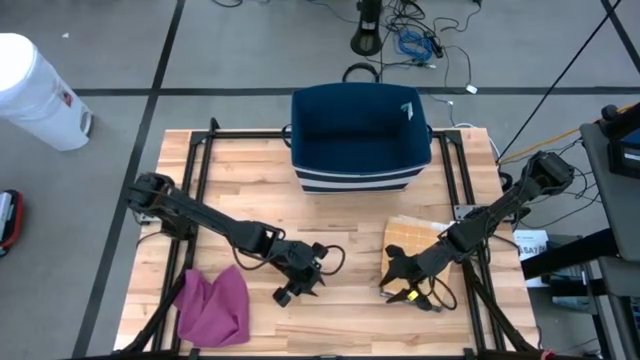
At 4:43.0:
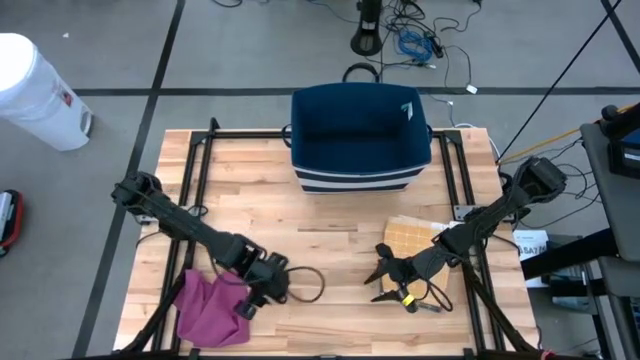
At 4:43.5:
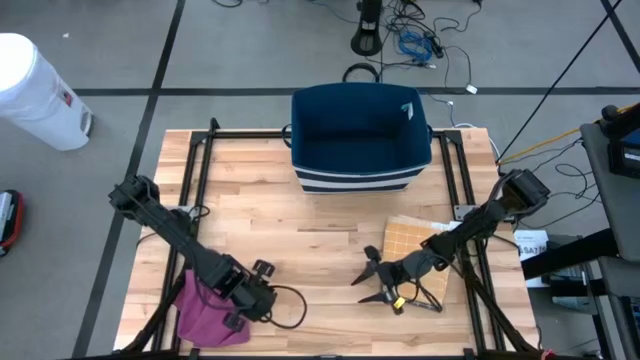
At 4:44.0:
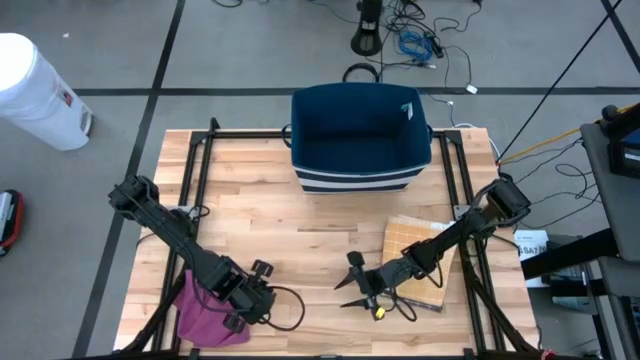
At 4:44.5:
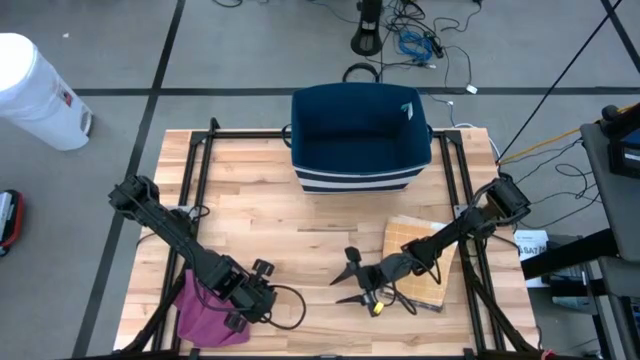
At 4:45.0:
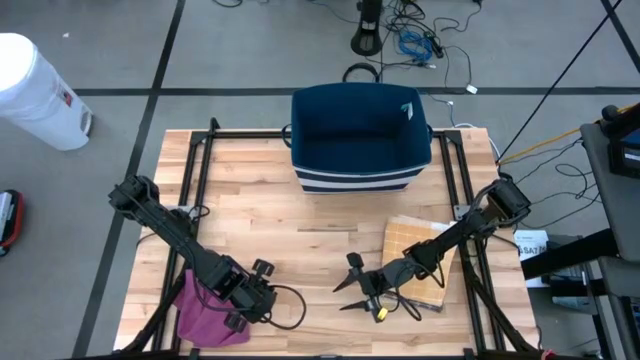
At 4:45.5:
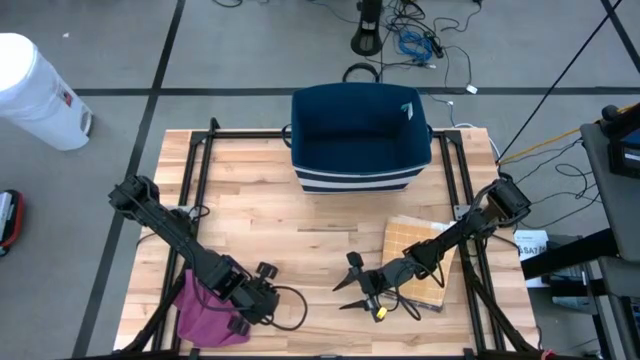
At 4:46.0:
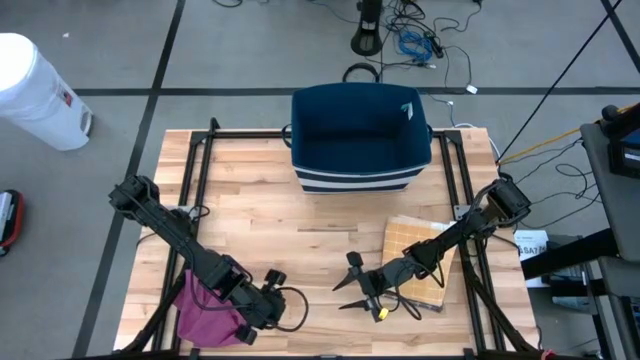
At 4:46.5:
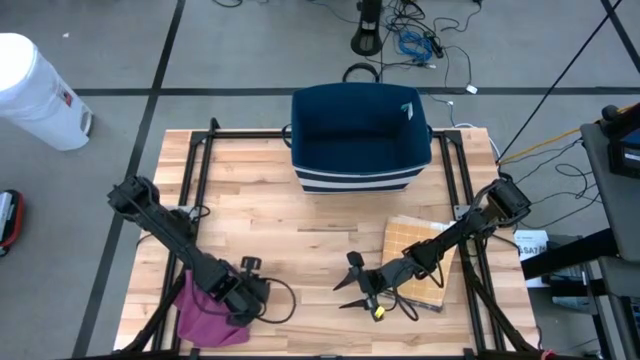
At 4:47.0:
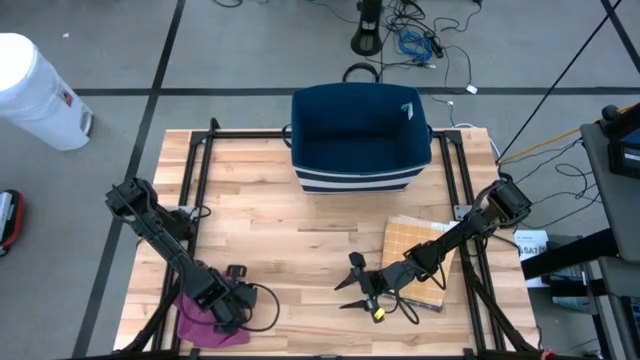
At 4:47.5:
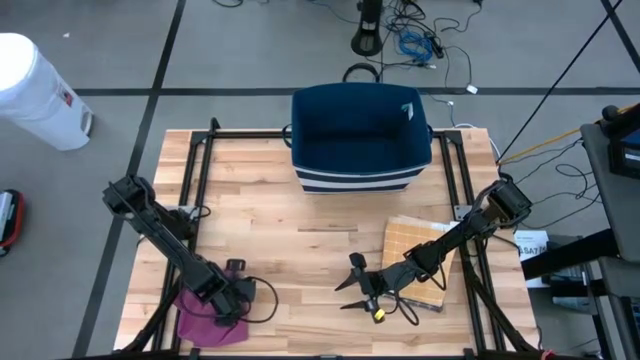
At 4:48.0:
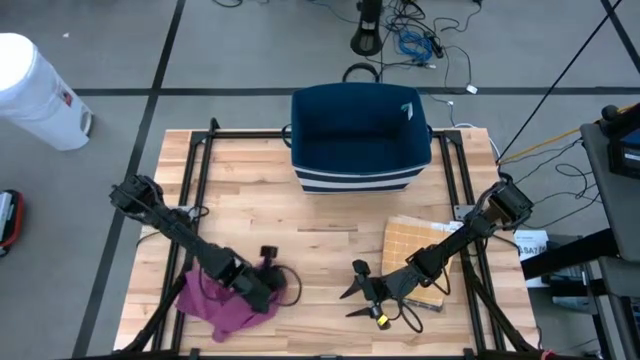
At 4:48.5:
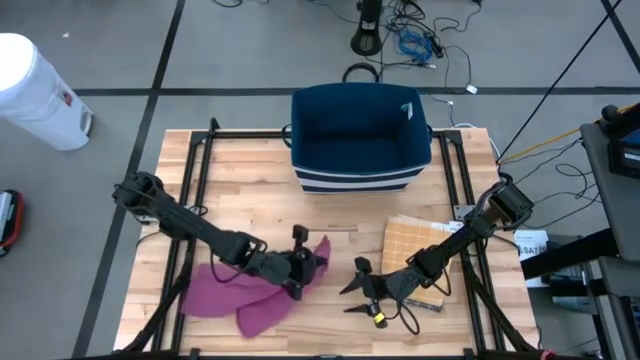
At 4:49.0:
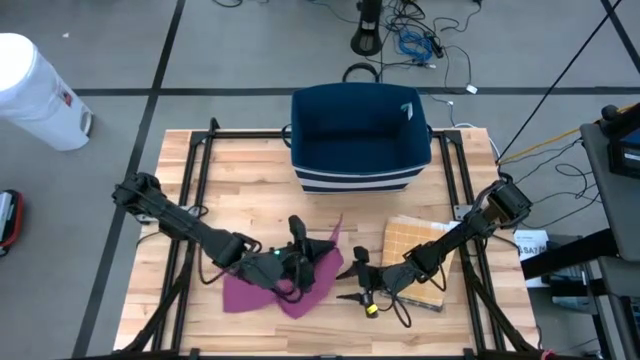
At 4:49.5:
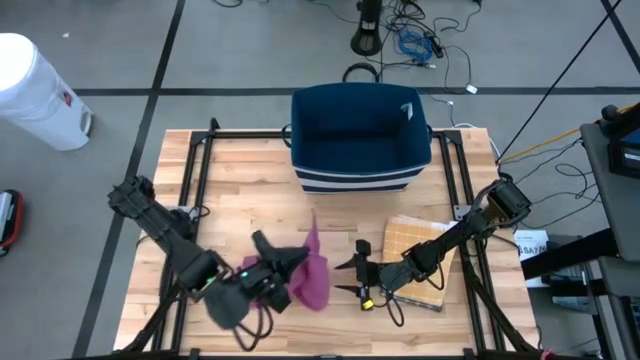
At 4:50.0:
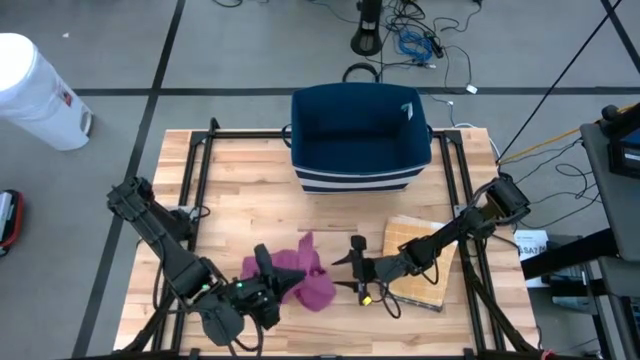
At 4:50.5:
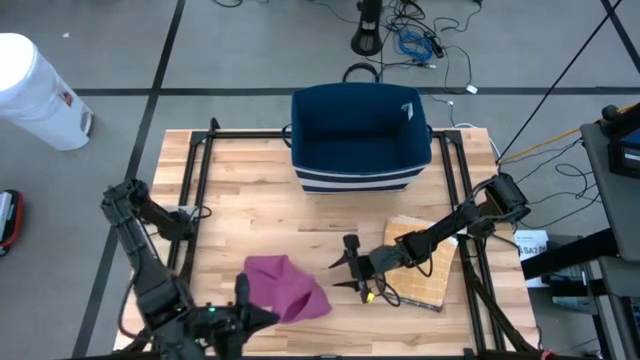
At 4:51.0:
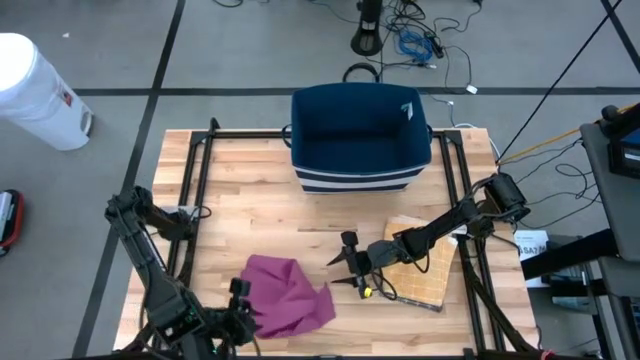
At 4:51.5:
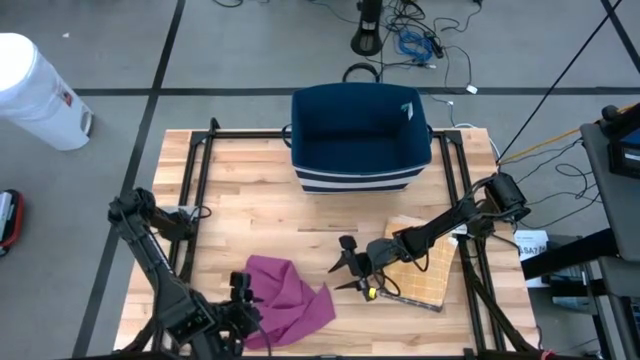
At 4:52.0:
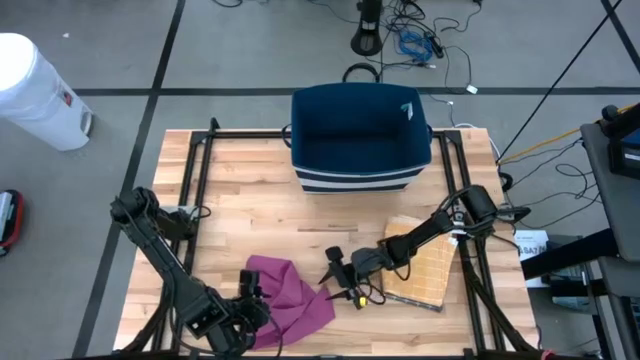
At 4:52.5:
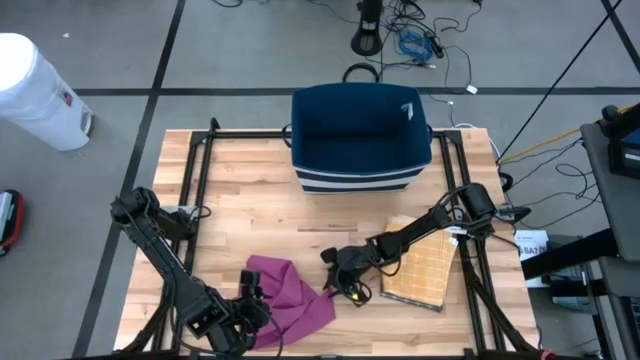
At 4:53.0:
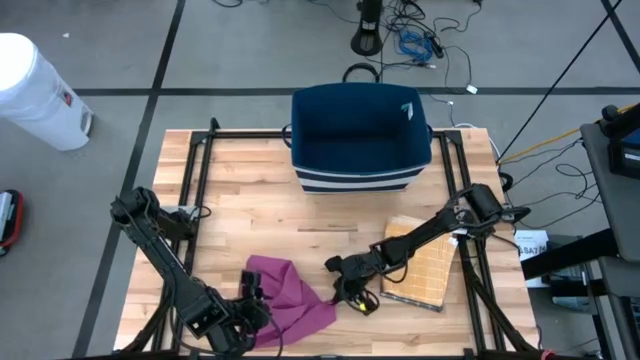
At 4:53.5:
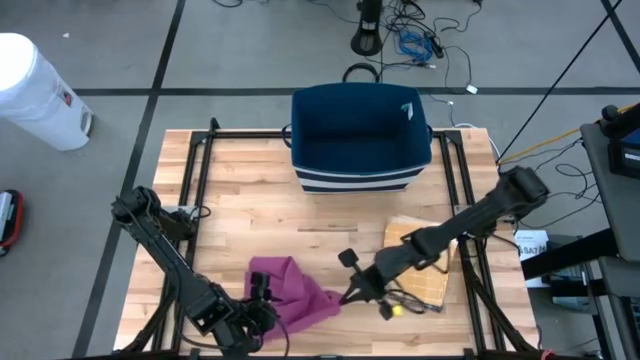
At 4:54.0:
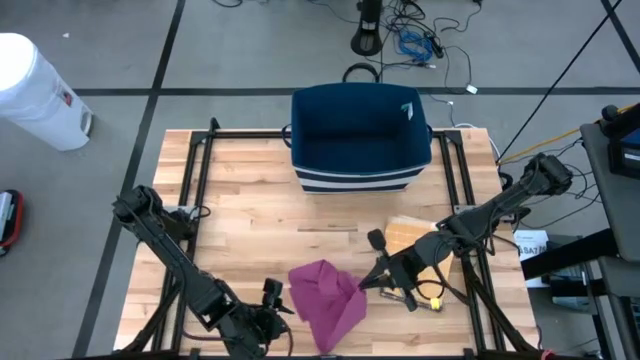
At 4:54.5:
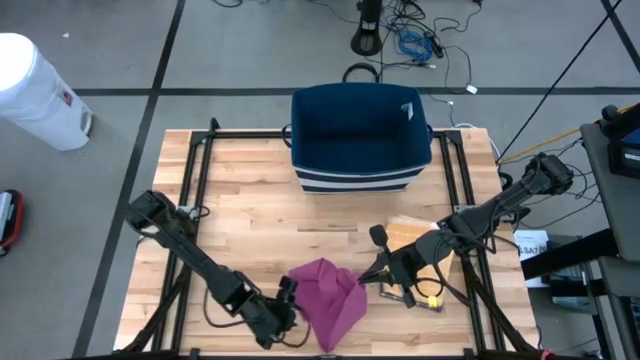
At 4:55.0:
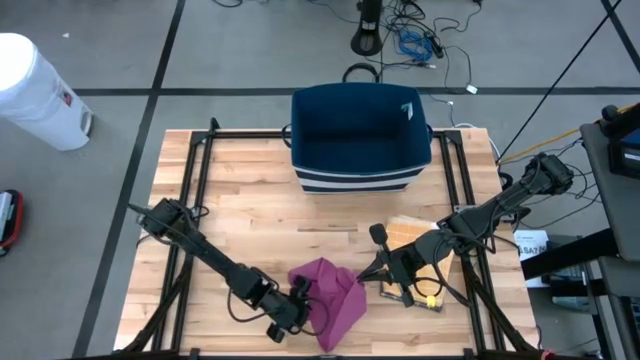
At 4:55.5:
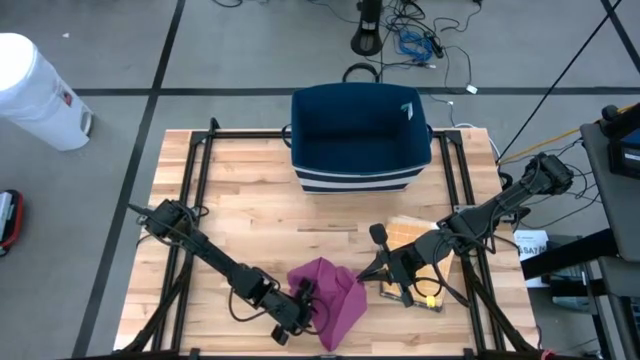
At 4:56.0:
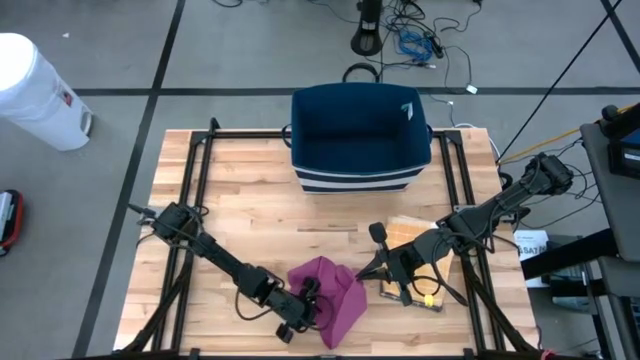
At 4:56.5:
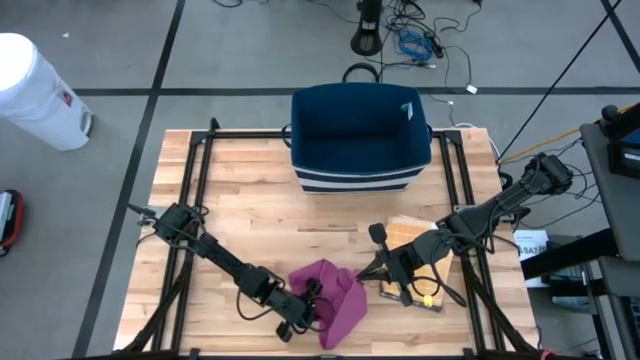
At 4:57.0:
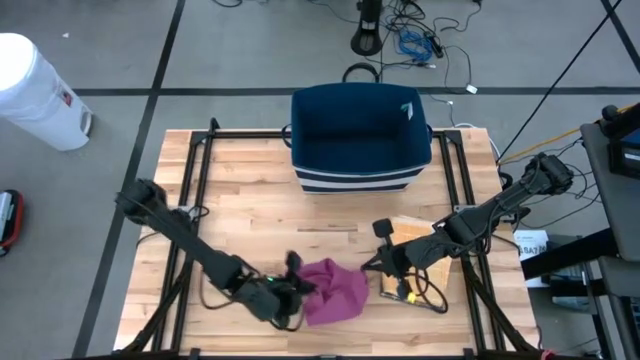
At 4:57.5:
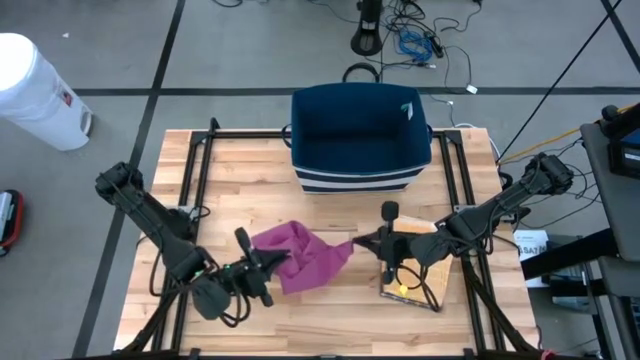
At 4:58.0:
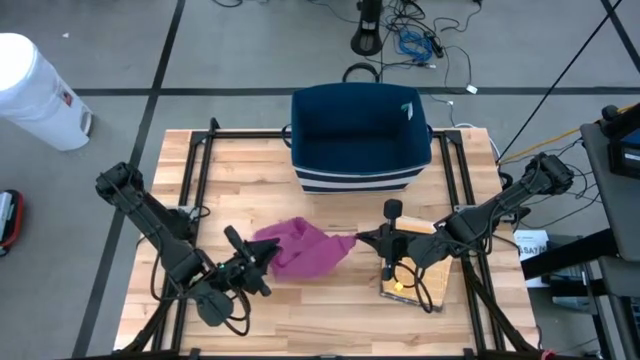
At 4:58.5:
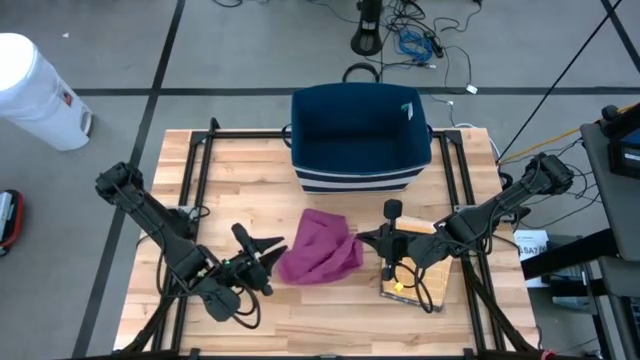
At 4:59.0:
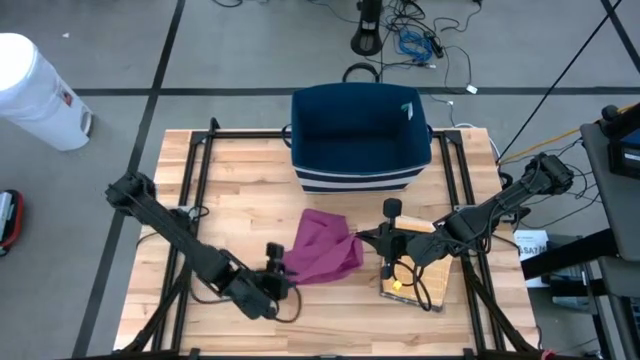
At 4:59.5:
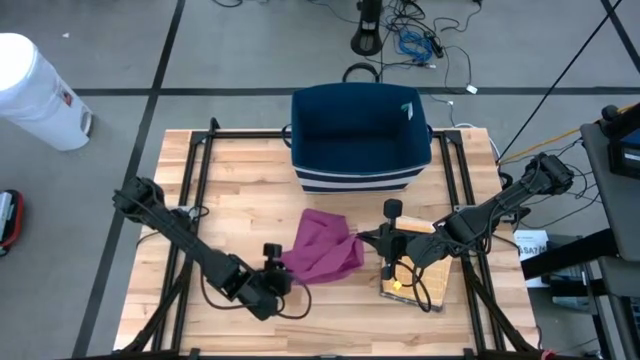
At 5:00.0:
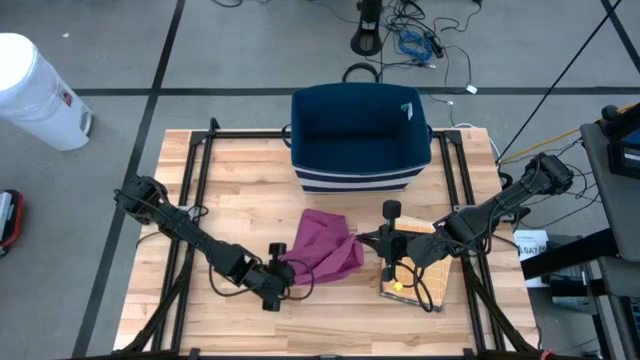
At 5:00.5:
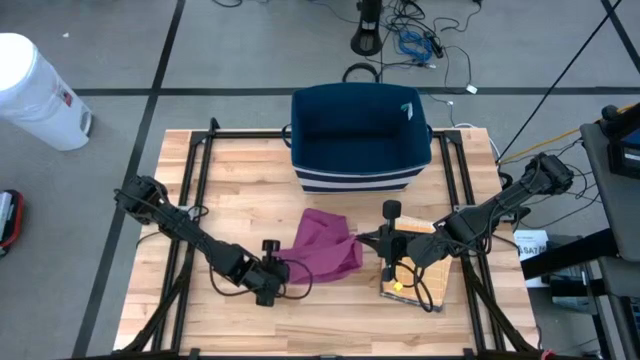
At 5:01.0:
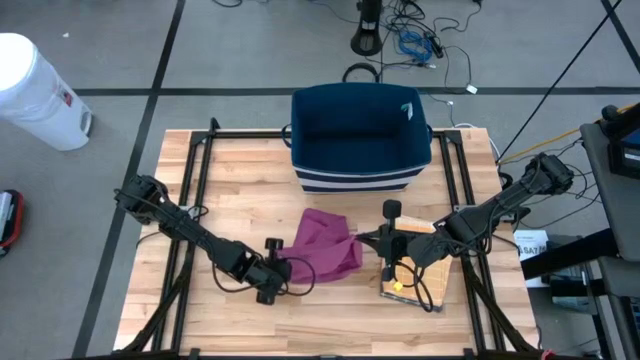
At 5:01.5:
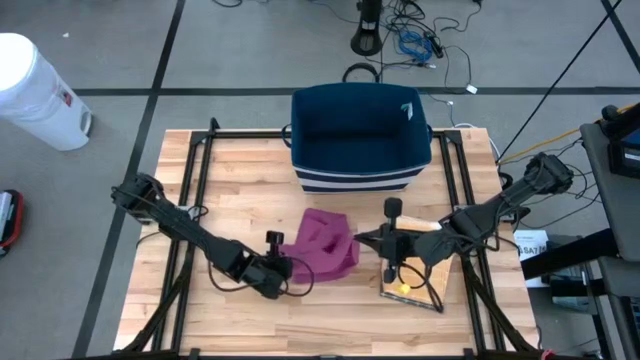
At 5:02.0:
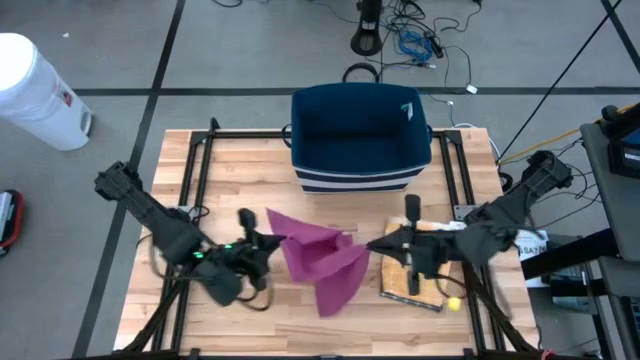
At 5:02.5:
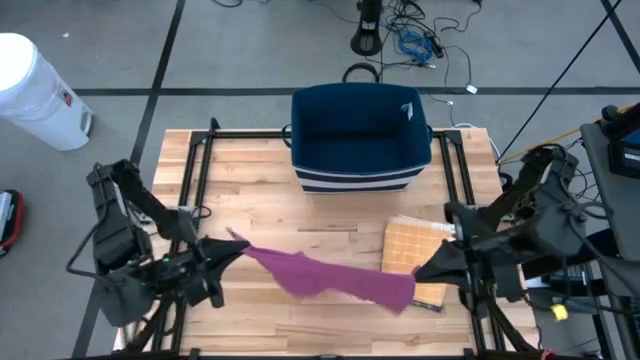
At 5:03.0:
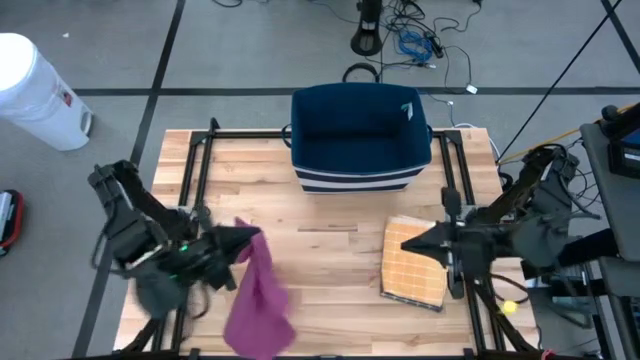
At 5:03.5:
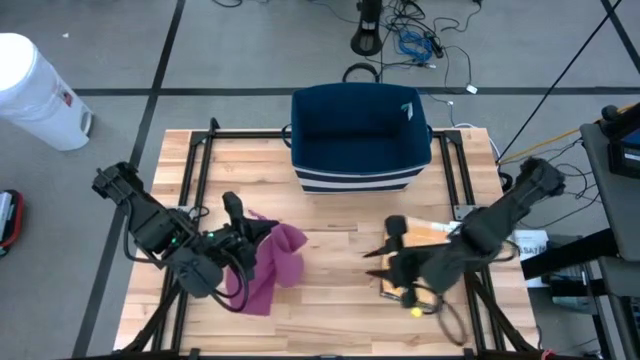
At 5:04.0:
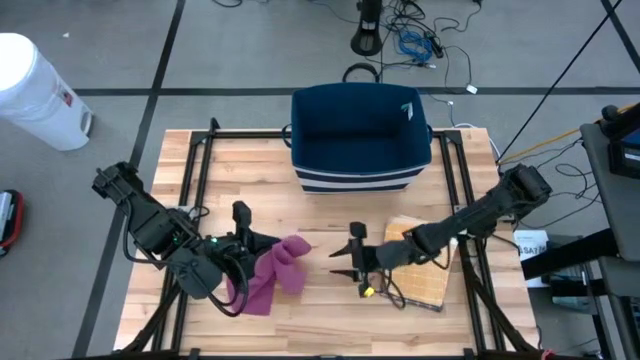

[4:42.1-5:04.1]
Task: Fold towel
Fold the purple towel
